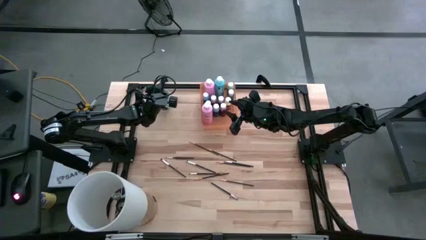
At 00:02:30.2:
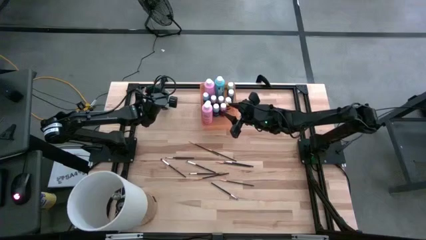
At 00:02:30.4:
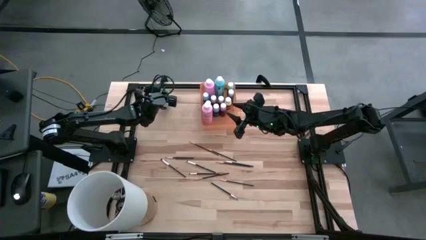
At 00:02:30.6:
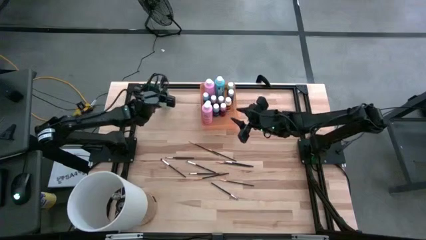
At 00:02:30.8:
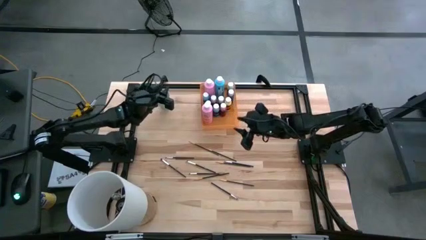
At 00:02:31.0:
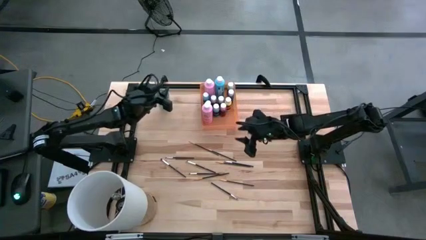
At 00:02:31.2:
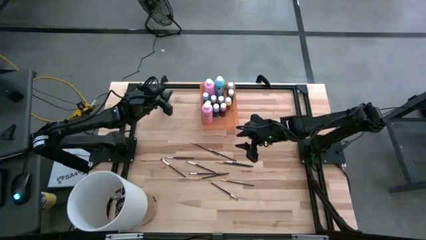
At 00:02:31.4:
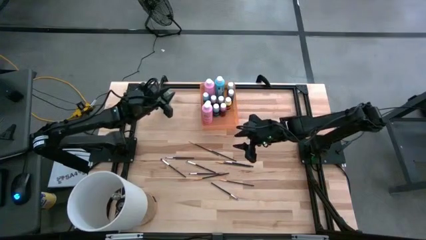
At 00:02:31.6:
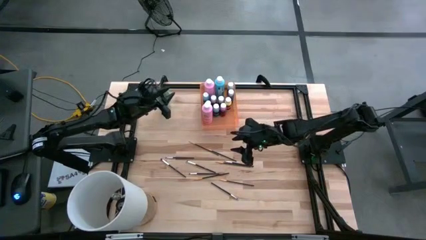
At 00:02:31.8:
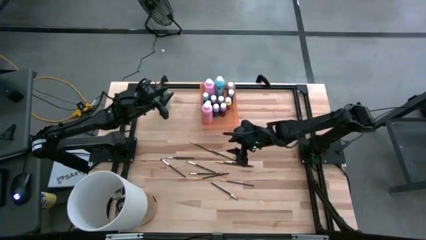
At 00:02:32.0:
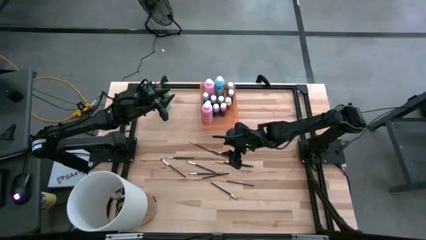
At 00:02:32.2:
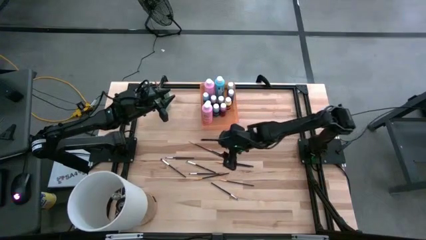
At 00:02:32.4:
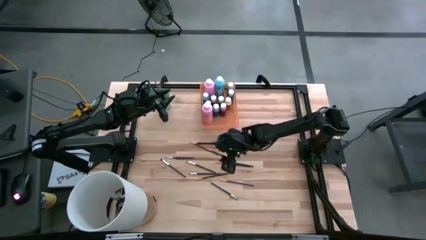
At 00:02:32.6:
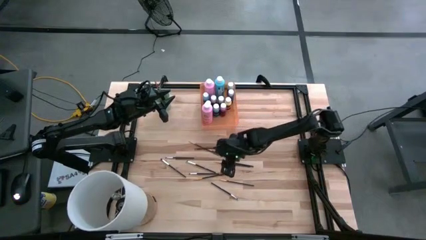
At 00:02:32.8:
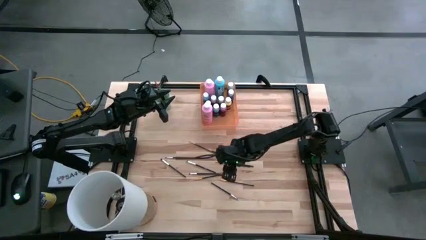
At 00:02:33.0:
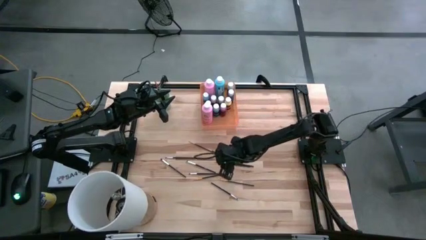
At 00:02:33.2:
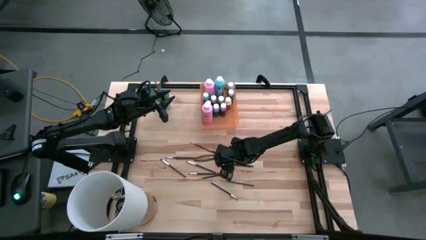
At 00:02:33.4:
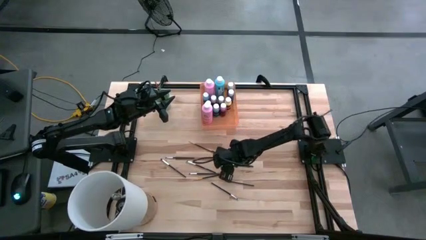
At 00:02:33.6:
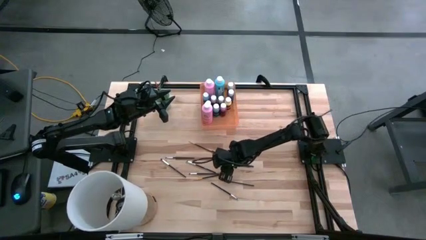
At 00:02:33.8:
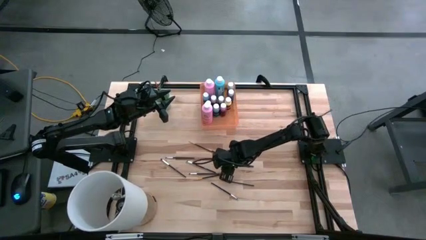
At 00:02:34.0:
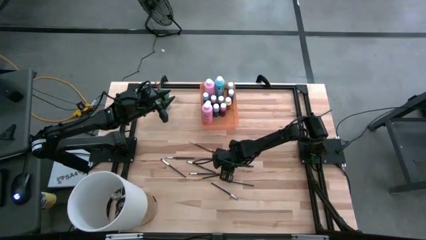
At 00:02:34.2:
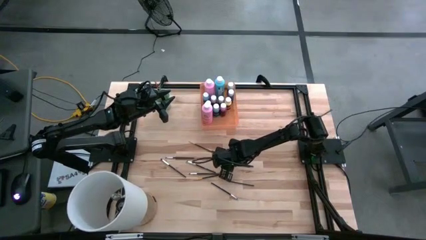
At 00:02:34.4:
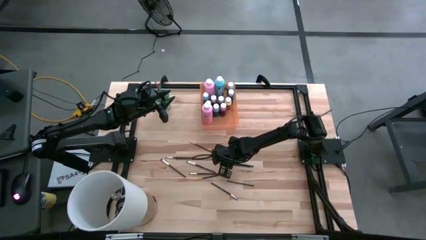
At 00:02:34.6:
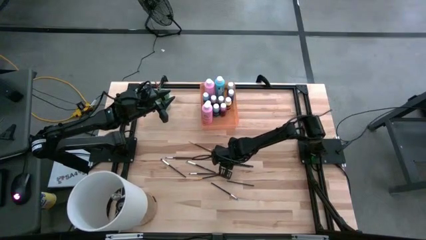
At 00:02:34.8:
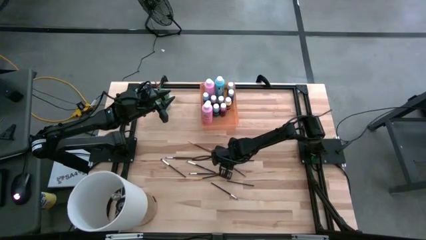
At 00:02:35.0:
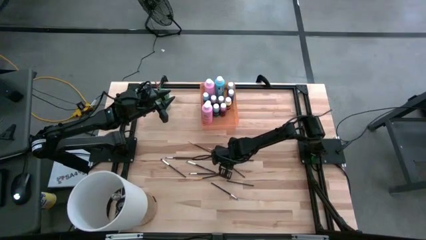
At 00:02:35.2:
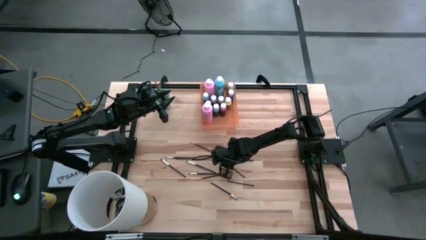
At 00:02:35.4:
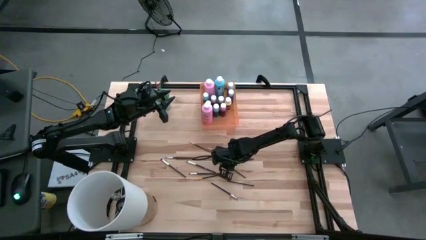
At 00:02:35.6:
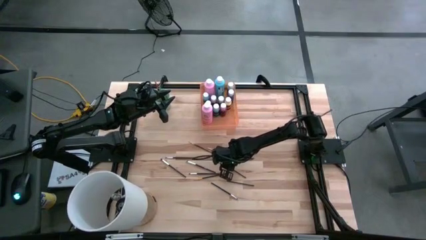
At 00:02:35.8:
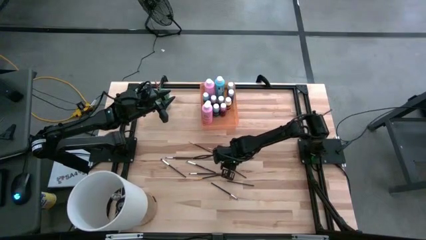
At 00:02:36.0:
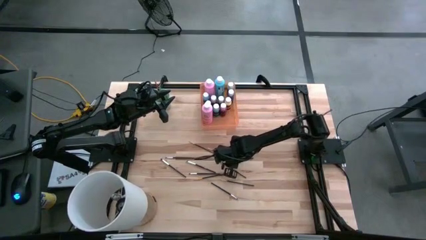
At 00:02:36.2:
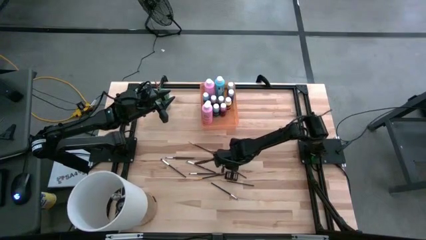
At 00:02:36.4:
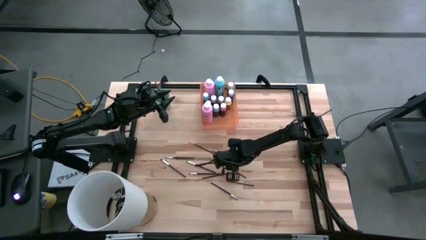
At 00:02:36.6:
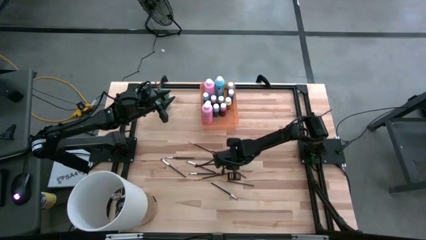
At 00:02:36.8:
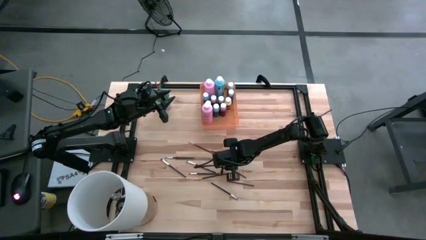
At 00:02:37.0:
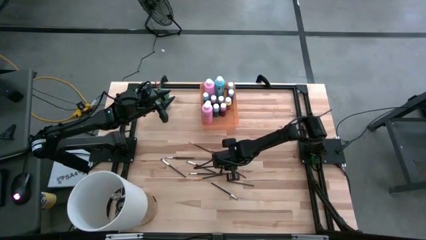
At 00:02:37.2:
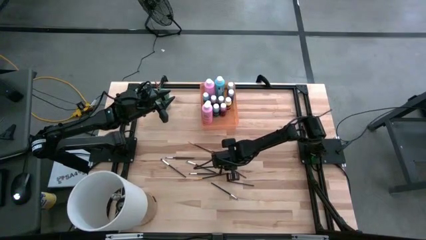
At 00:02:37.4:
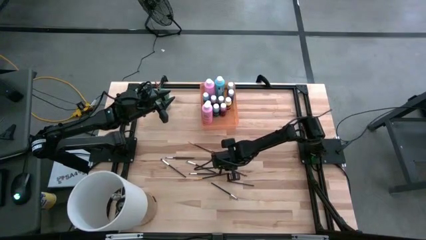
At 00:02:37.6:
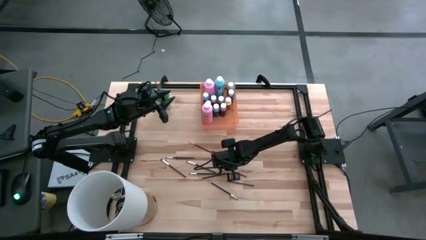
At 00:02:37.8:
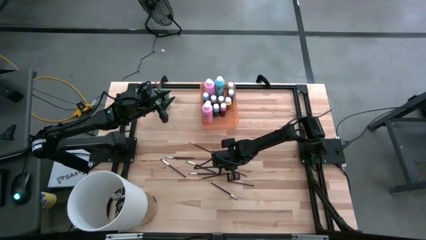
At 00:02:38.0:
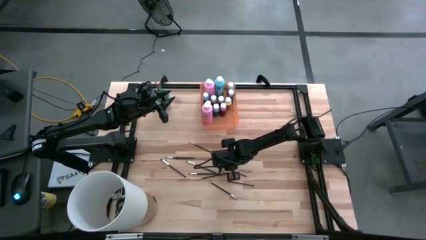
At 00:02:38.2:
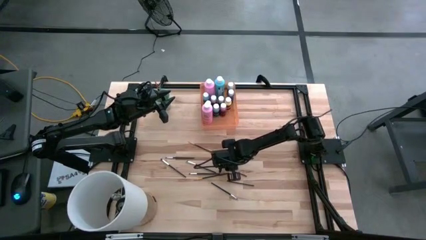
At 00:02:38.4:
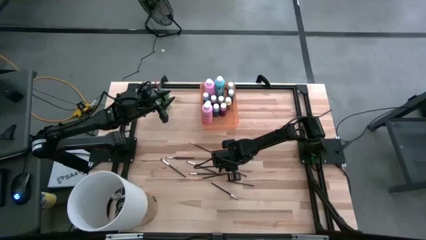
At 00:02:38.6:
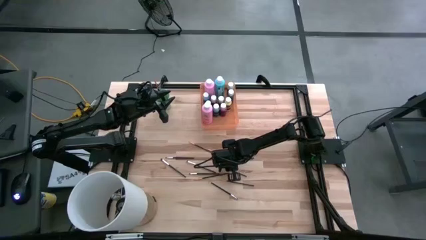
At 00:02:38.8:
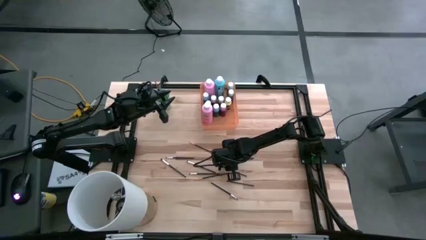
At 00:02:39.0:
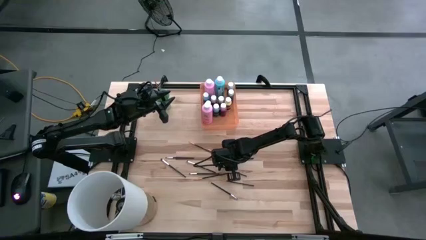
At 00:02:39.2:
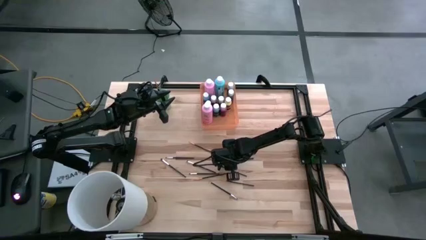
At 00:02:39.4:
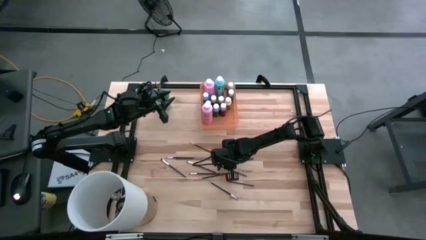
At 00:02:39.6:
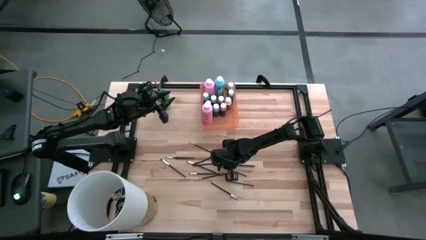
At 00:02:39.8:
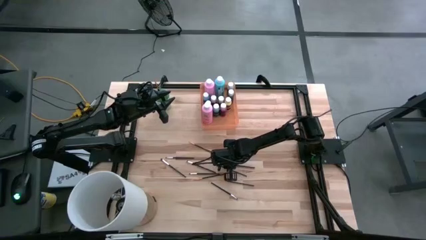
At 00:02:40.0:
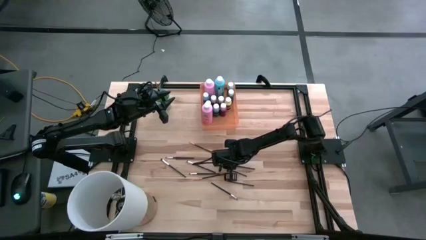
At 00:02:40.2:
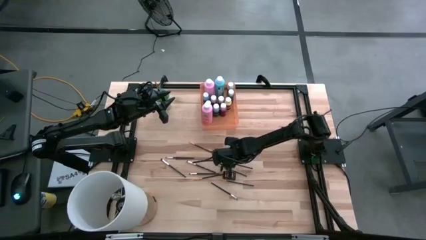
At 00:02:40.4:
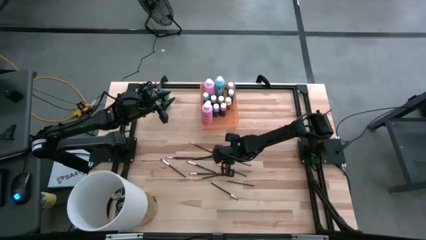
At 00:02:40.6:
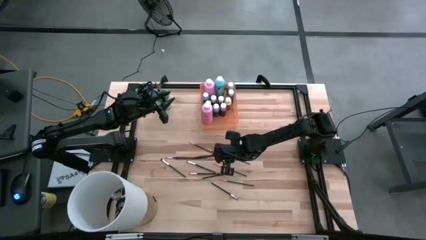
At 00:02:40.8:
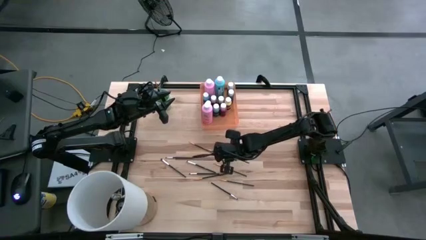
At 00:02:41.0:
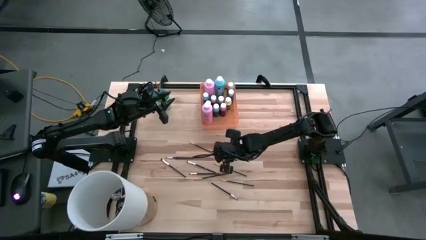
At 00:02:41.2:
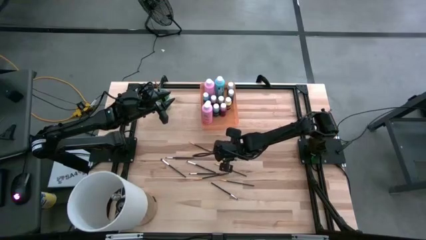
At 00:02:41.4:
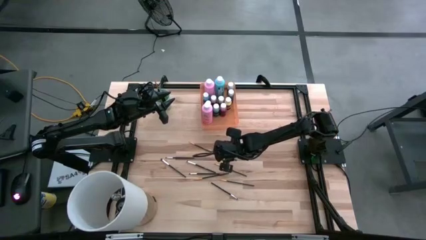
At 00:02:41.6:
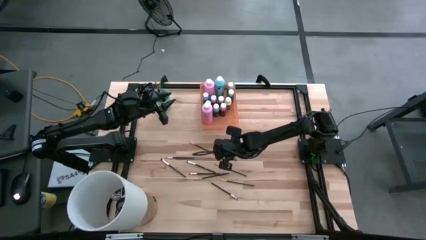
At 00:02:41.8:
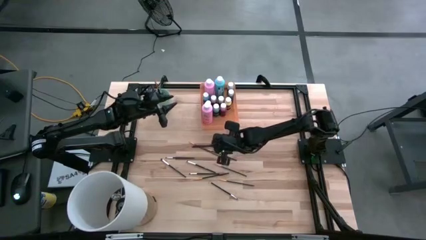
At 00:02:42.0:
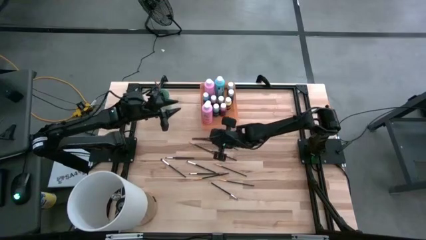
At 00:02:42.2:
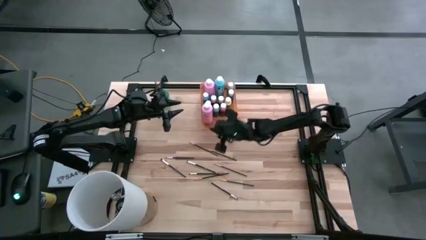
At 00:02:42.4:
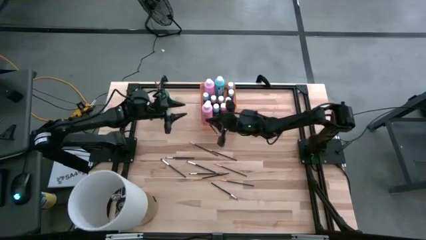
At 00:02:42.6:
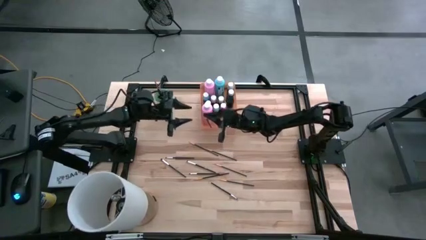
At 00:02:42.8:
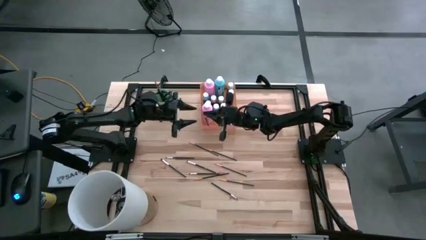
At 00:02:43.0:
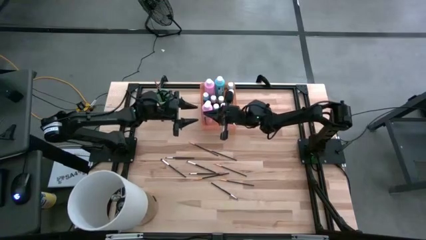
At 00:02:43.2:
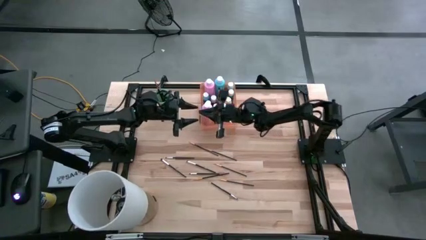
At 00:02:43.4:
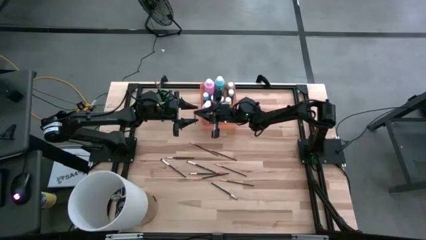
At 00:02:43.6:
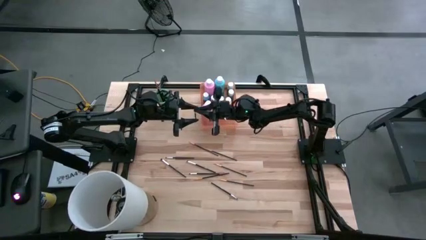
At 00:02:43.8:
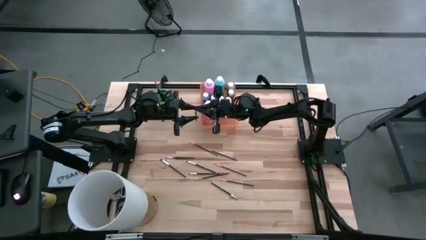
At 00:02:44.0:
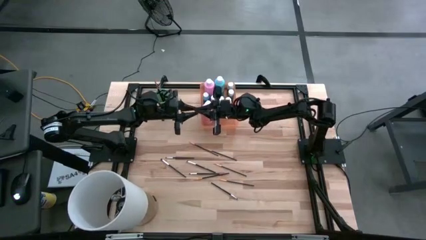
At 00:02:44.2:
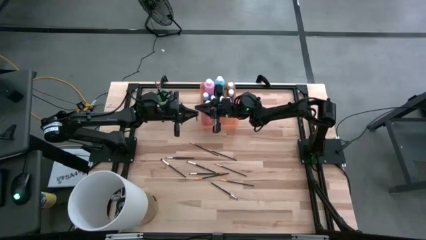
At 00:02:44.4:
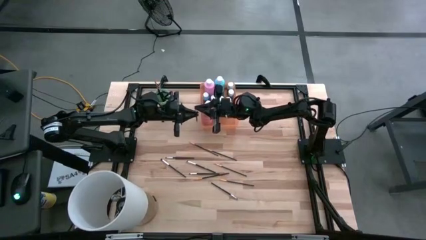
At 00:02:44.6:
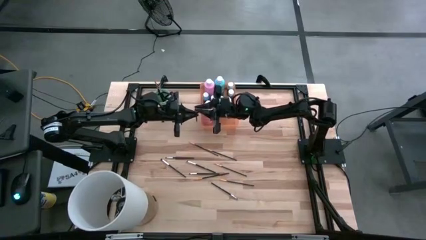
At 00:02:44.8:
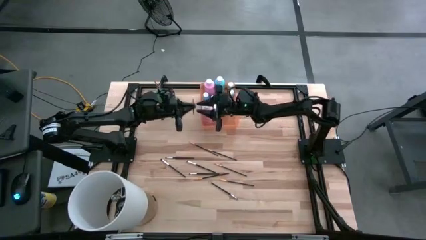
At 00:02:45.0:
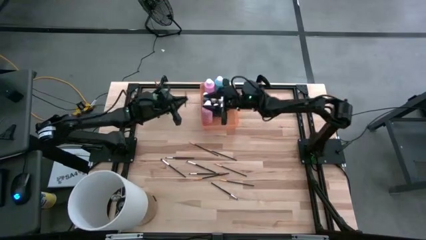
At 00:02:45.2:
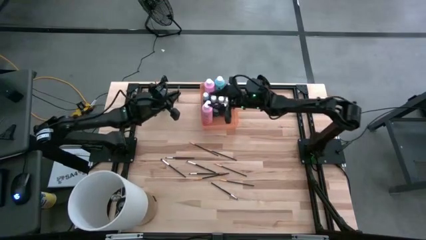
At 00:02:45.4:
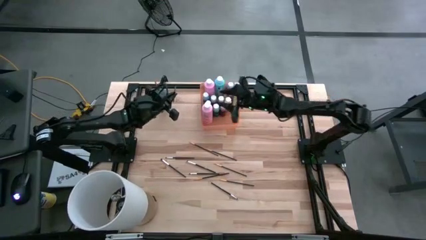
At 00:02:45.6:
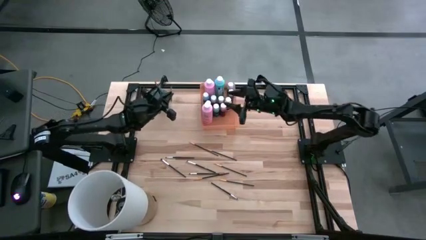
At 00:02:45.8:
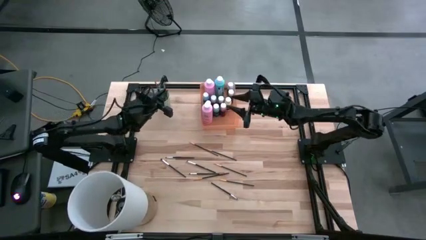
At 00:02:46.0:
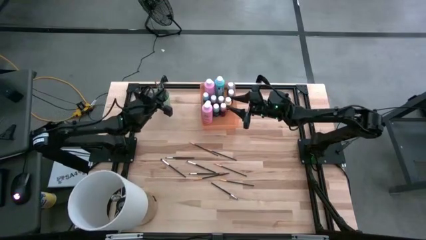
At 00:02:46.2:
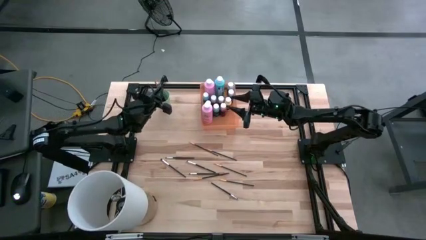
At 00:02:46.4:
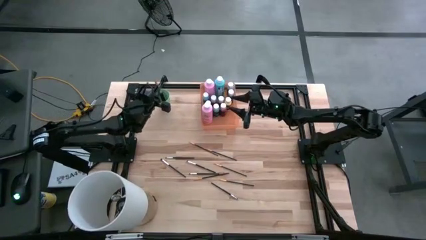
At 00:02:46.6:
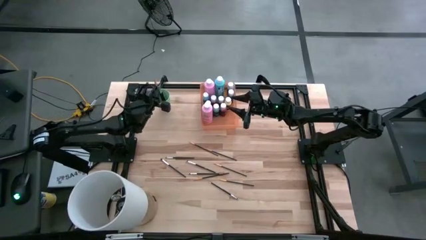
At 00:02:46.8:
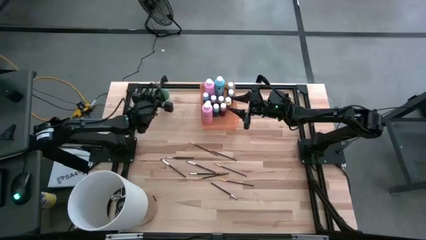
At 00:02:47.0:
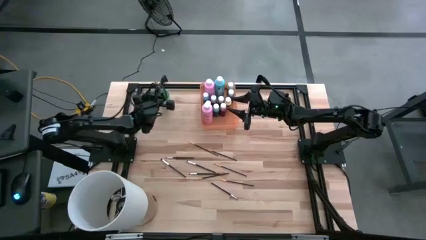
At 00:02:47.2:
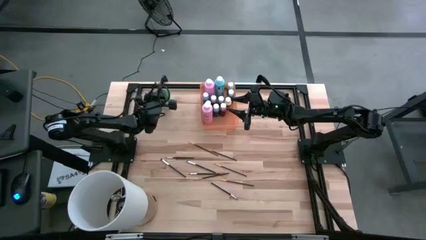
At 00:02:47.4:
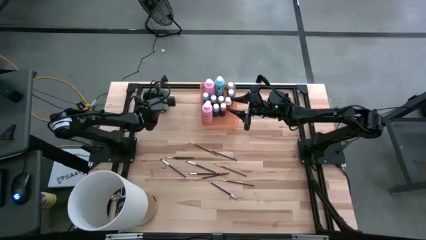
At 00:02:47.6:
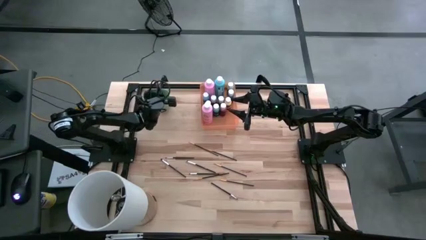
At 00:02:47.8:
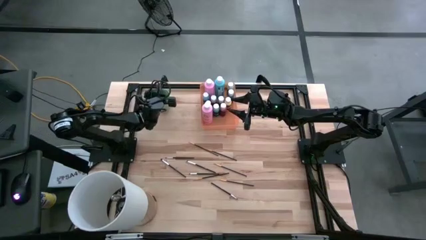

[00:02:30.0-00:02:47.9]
Task: Pick & Place Paint Supplies
Put the white paintbrush into the cup
